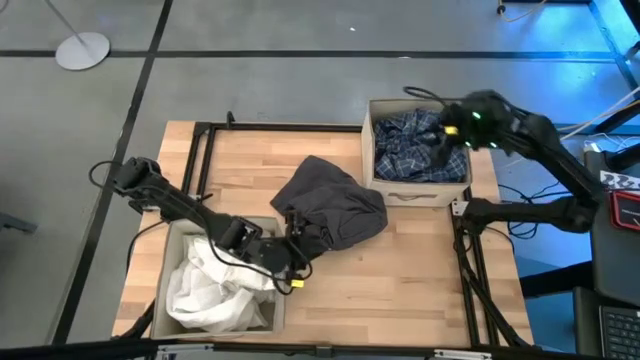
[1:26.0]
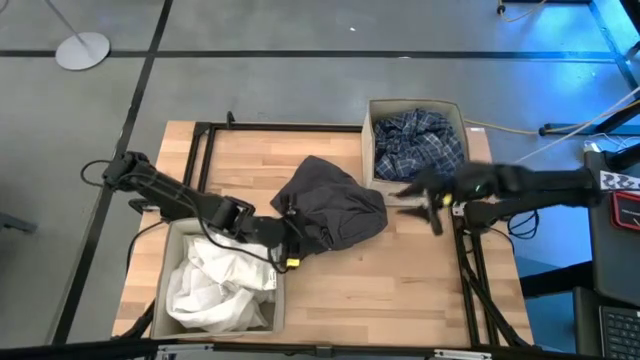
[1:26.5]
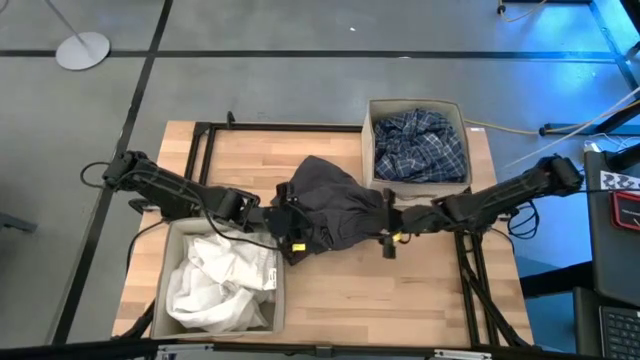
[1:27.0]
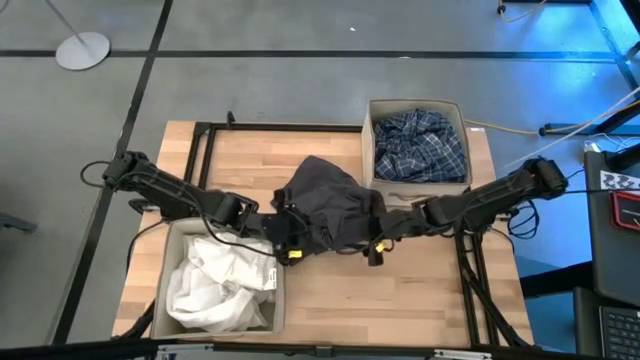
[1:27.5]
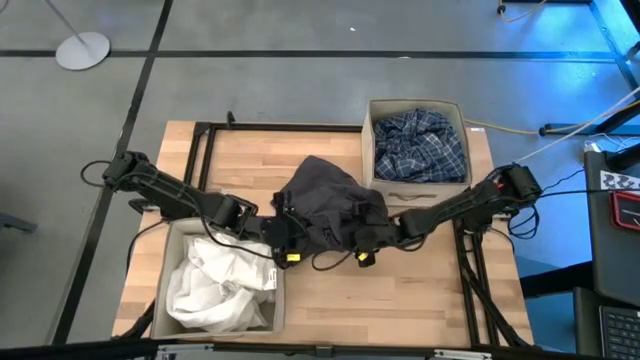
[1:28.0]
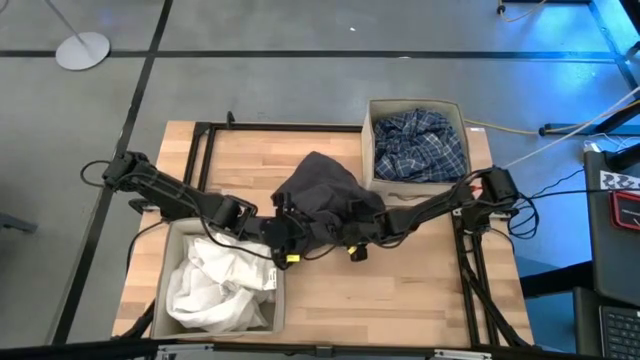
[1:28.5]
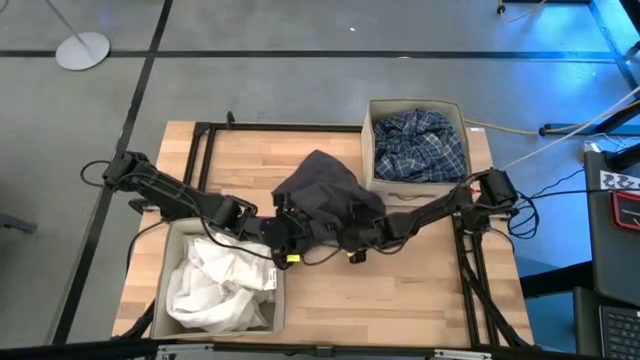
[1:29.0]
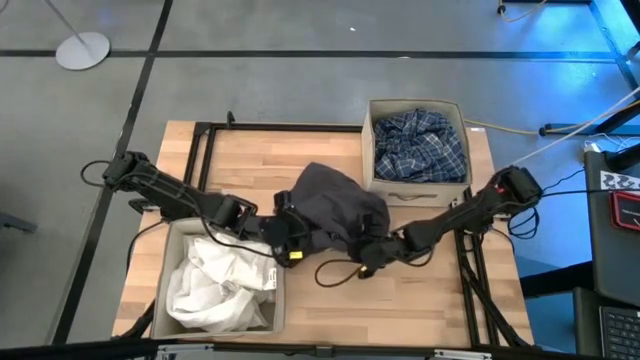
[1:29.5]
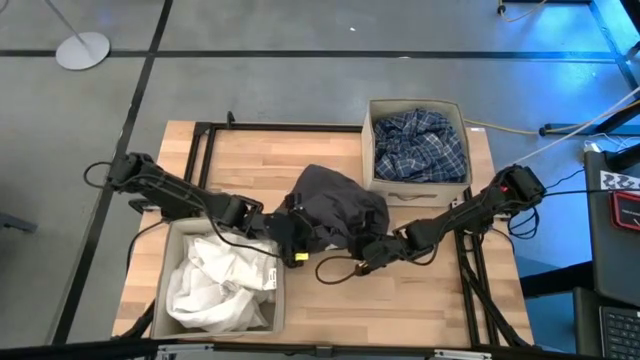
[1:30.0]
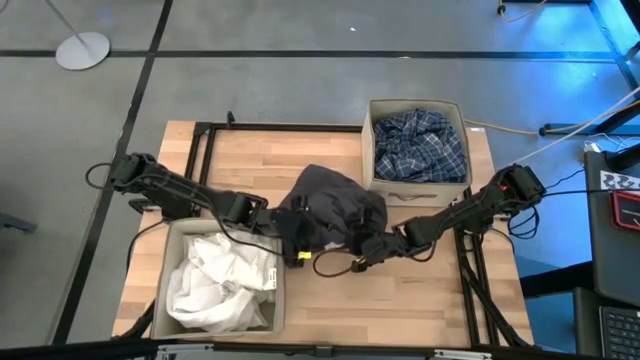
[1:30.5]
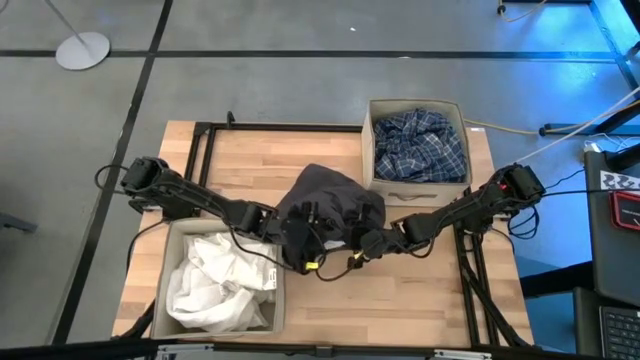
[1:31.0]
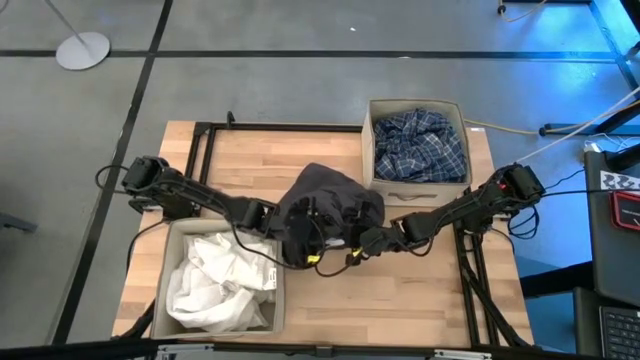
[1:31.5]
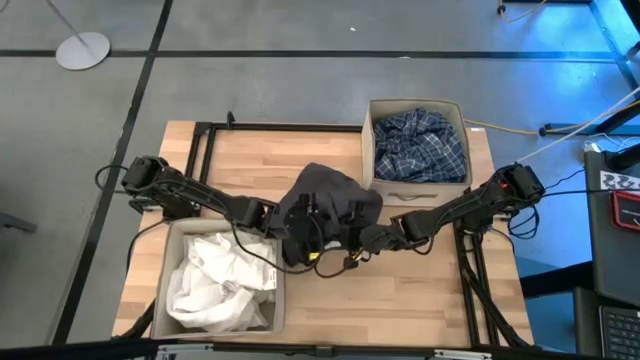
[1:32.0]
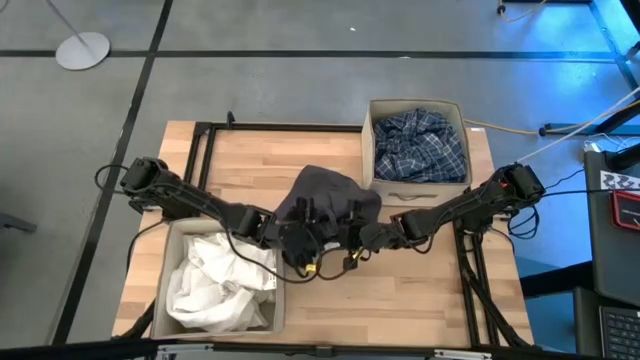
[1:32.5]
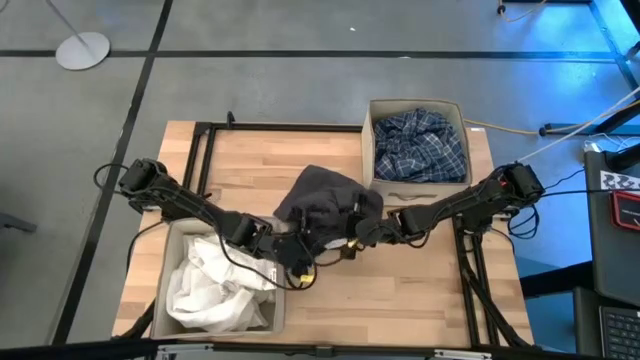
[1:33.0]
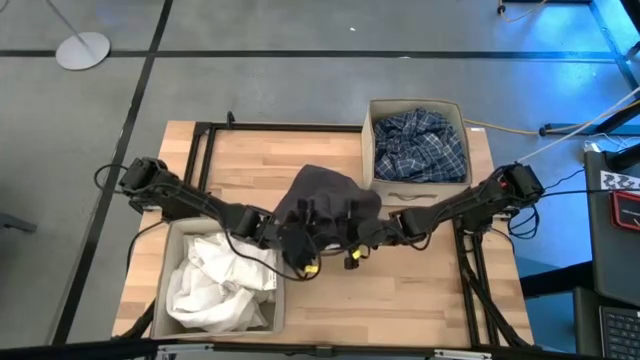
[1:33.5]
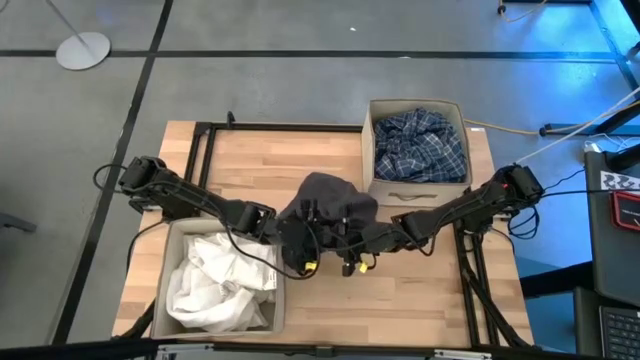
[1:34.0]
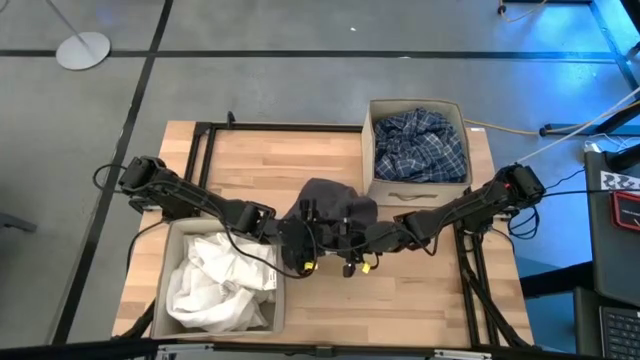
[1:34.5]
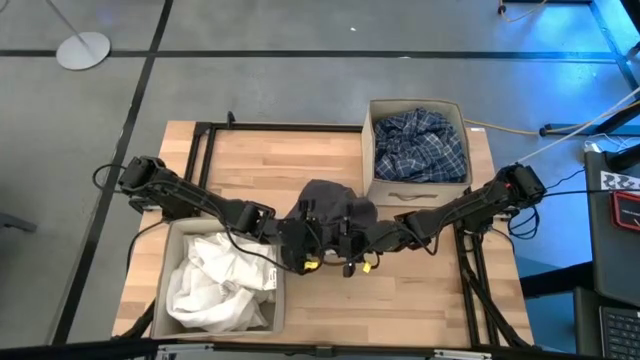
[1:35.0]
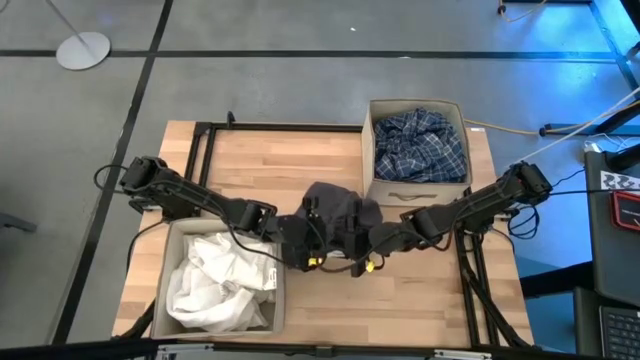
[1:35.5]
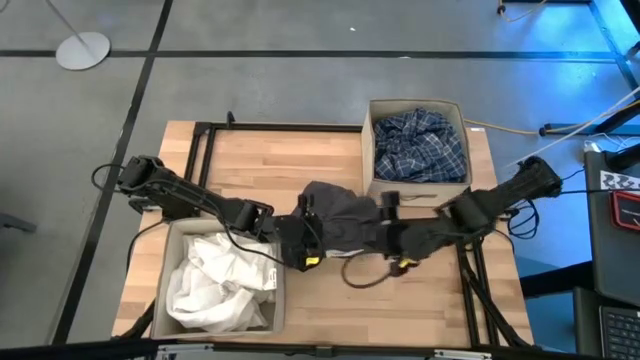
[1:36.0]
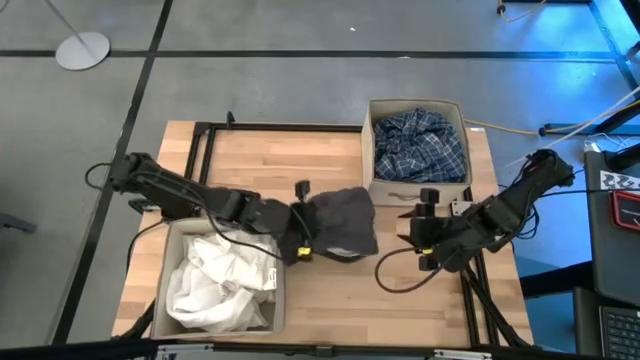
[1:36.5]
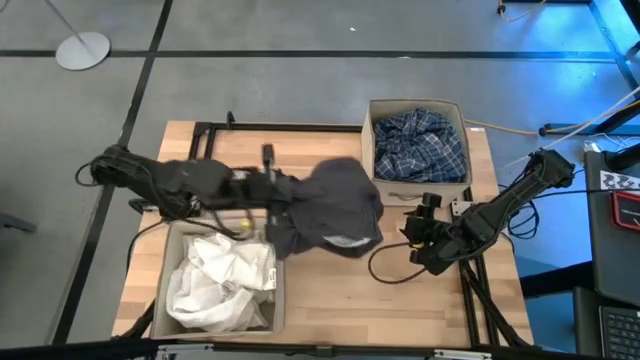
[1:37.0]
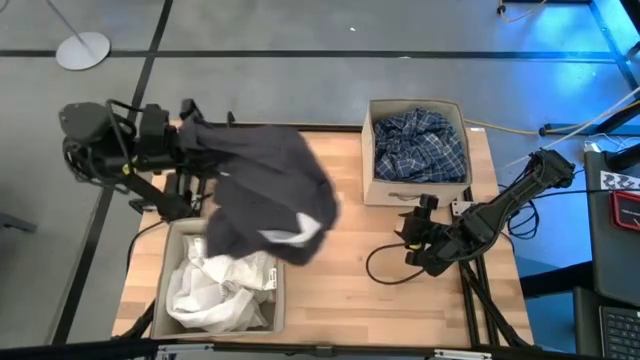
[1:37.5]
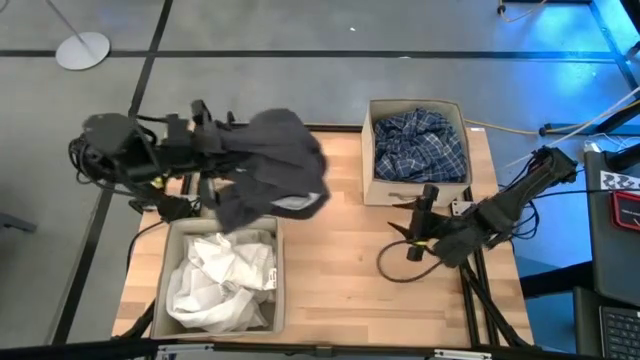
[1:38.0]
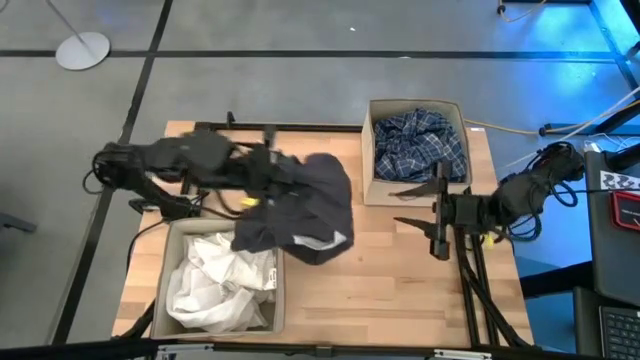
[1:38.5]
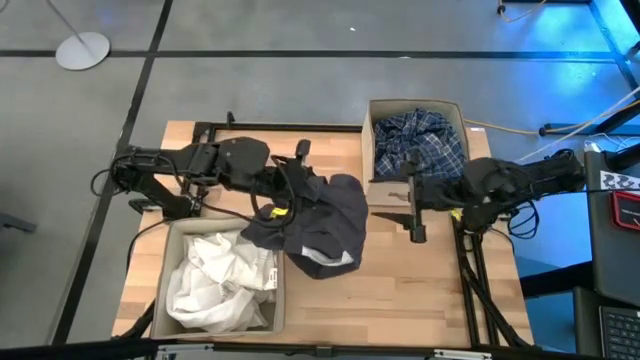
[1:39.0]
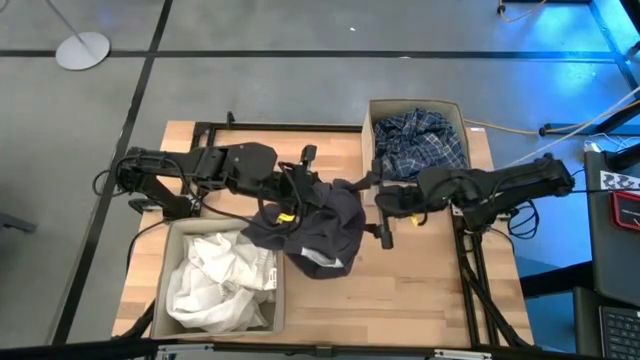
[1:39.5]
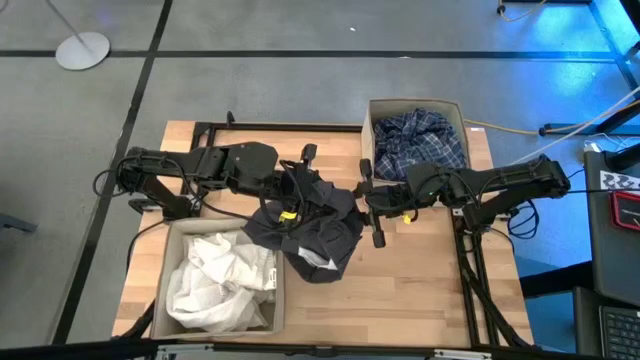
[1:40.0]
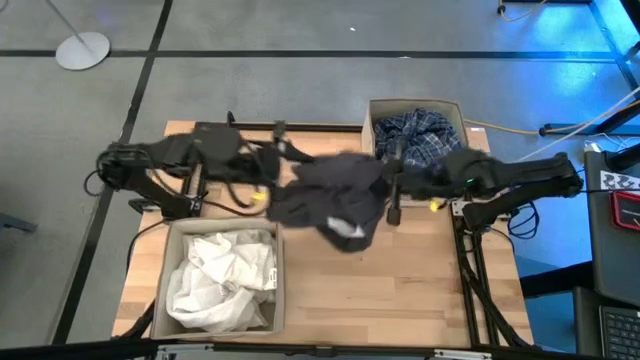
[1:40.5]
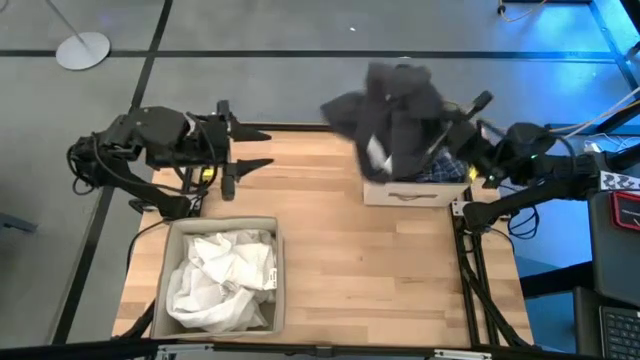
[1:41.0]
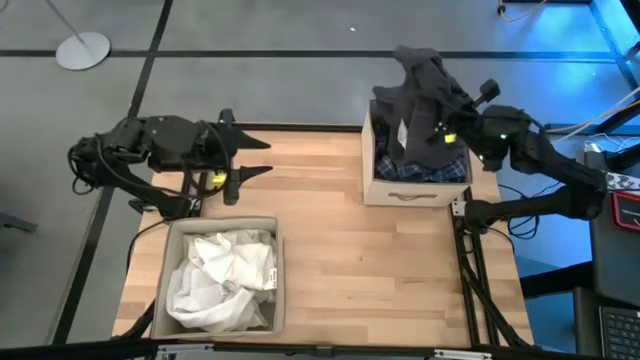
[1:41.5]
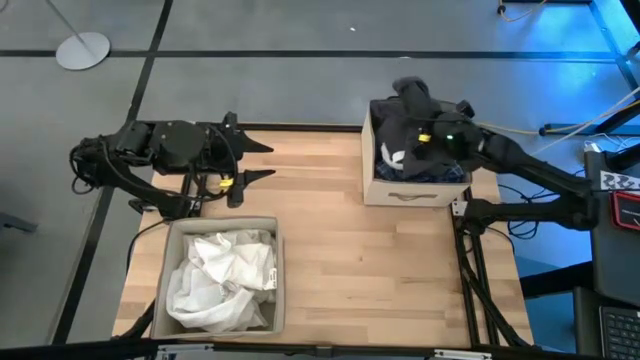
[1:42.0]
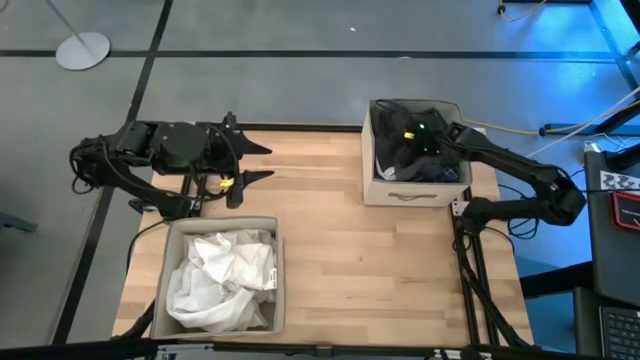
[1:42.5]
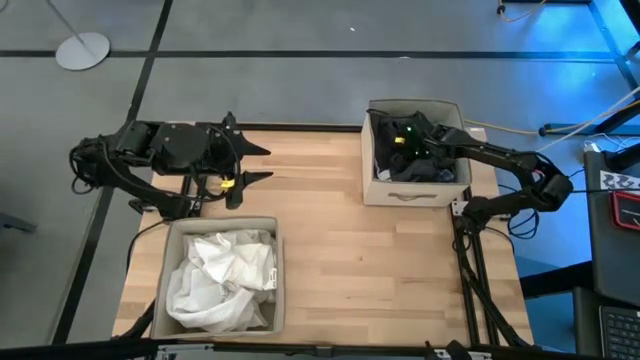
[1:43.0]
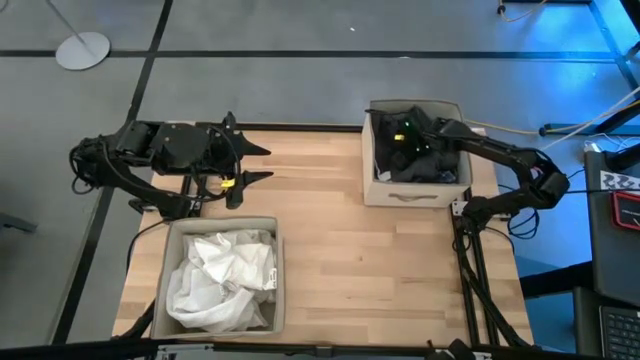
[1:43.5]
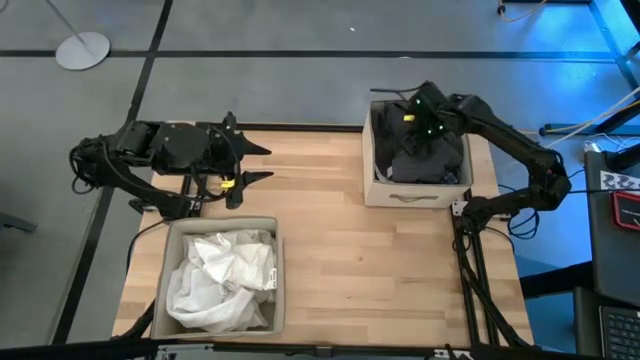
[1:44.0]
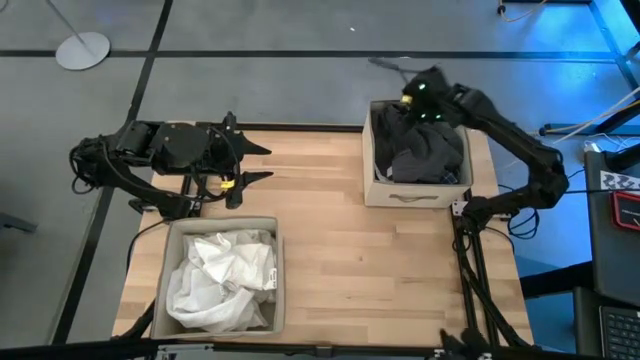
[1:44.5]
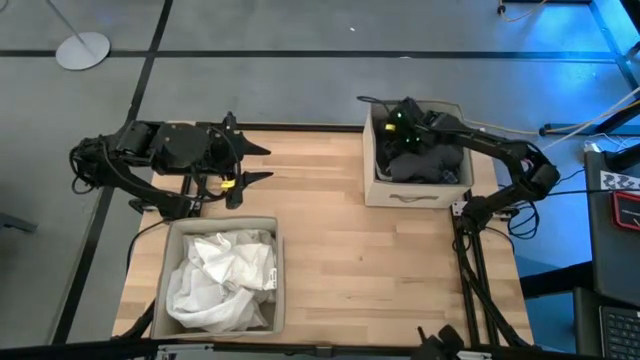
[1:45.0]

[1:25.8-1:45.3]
Task: Sort clothes
Put the black shorts into the top brown laundry bin

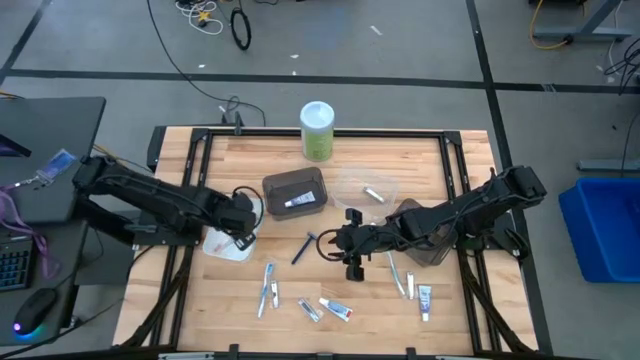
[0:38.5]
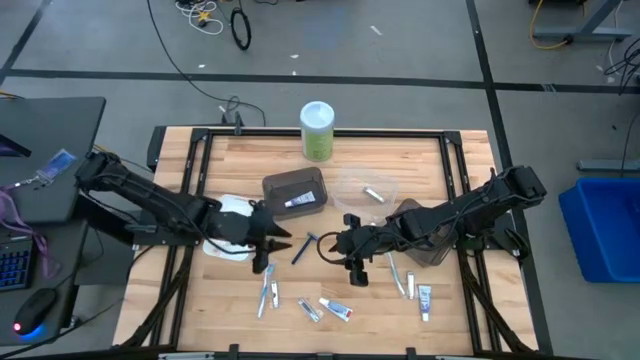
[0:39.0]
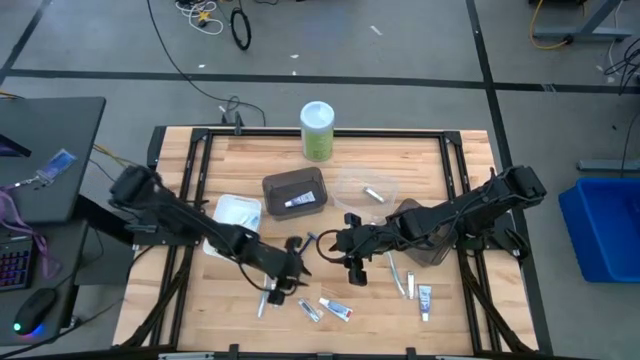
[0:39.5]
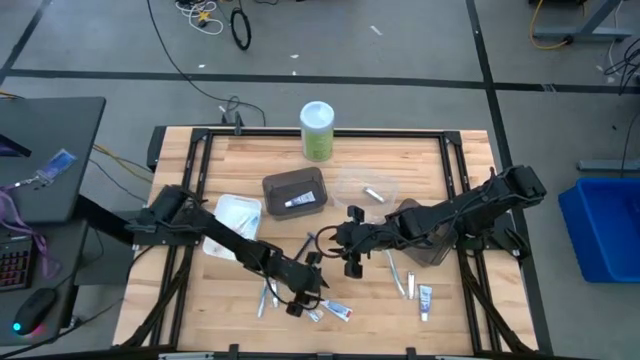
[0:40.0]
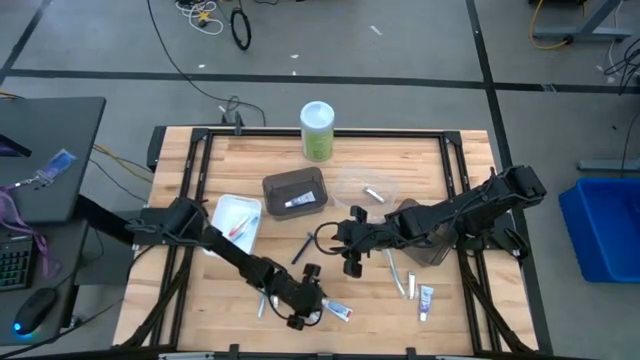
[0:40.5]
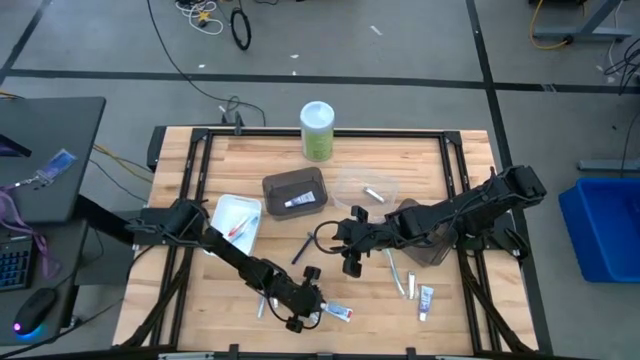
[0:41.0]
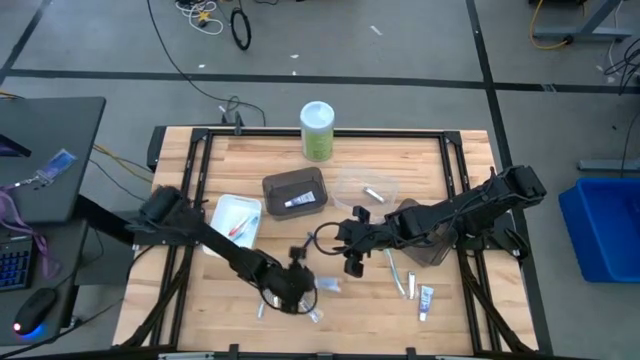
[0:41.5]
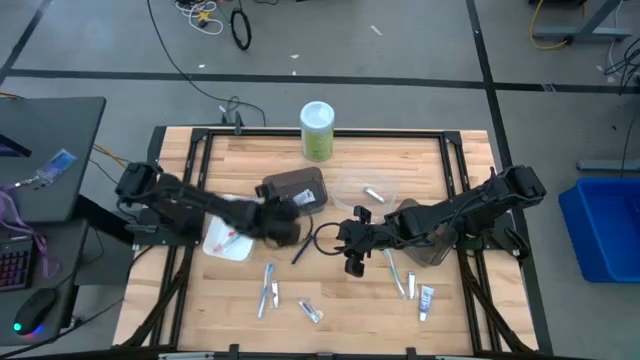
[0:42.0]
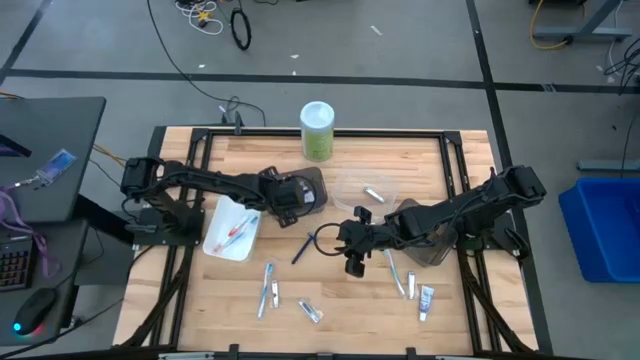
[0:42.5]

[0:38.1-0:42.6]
Task: Pick & Place Travel size toiletries
Put the toothpaste into the left black bin
